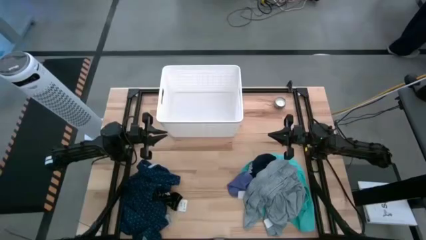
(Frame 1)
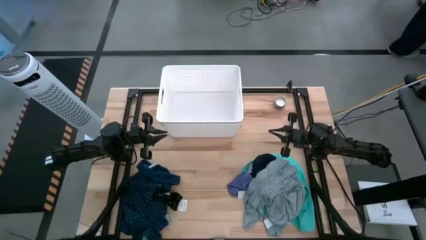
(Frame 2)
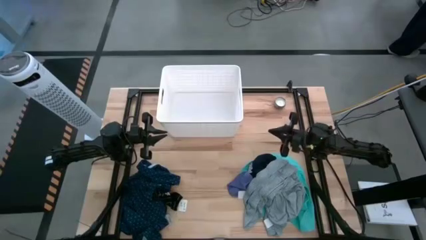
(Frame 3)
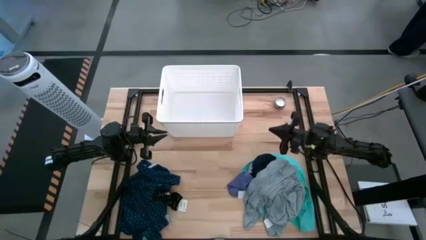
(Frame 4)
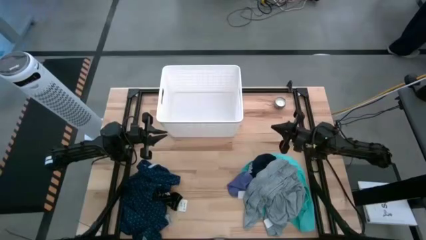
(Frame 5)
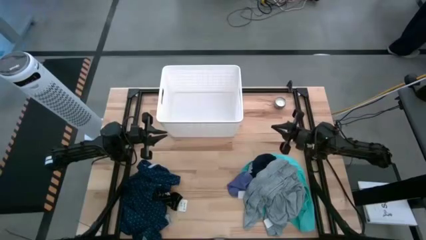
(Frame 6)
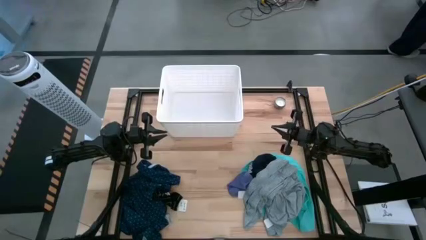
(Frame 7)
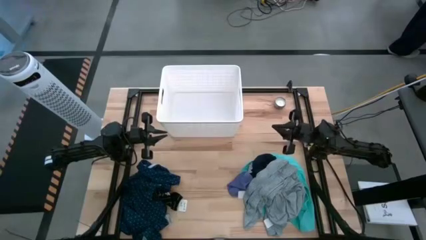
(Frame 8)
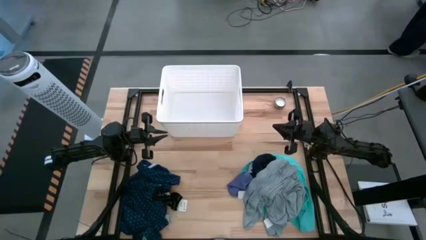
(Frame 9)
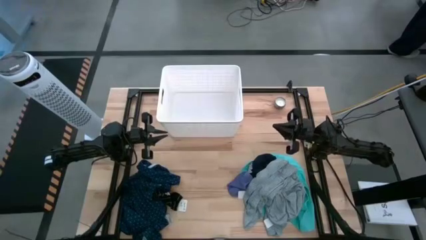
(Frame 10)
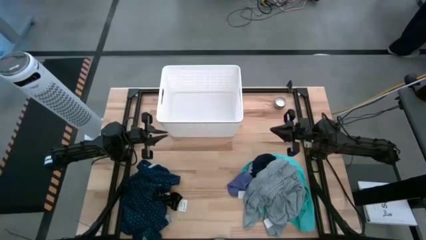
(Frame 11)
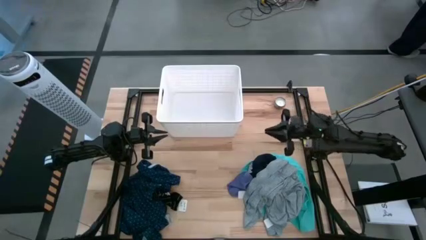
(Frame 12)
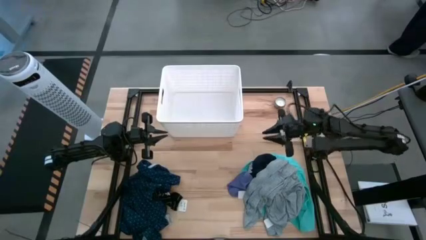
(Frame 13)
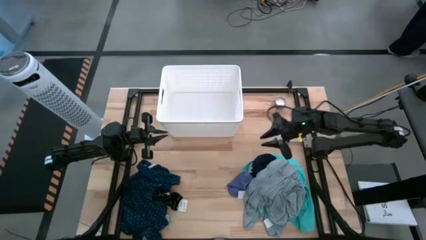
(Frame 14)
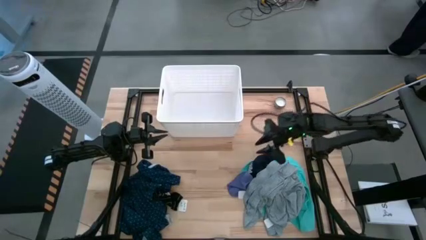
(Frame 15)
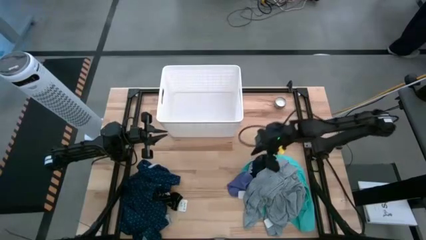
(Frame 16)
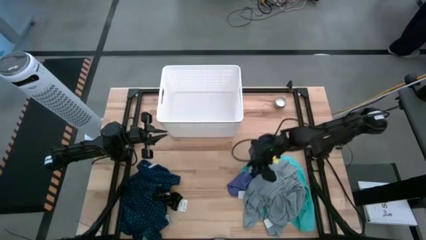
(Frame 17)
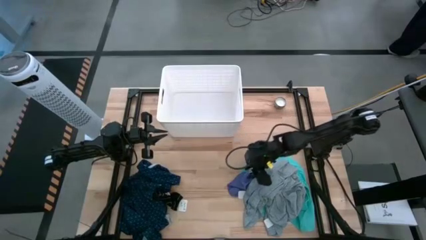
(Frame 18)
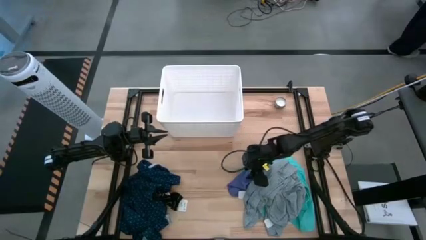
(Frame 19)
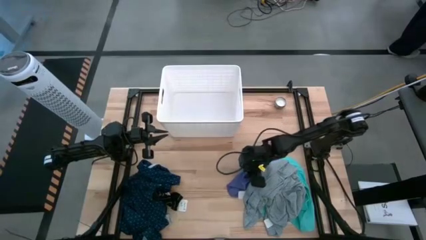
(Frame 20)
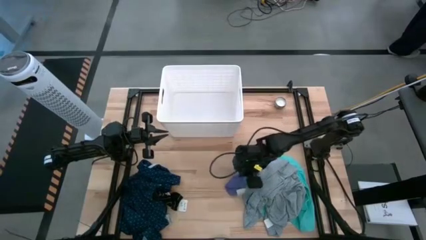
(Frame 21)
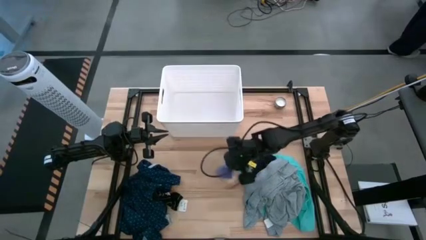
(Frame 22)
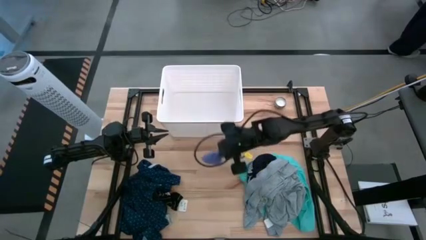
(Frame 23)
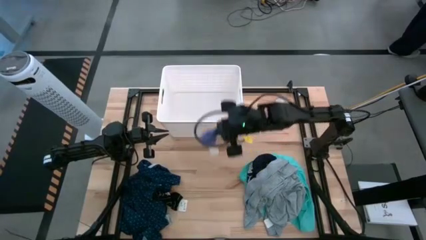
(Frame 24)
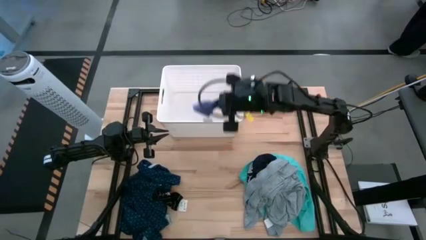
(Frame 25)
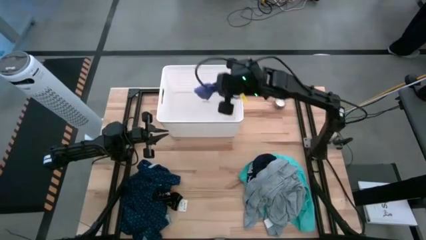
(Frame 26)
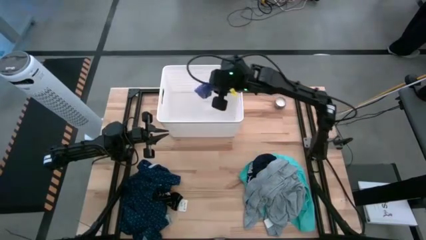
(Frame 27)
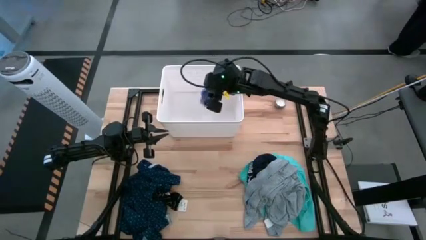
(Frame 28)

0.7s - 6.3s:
Task: Sort clothes
Put the blue sock into the white laundry bin

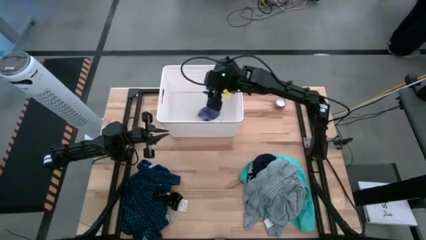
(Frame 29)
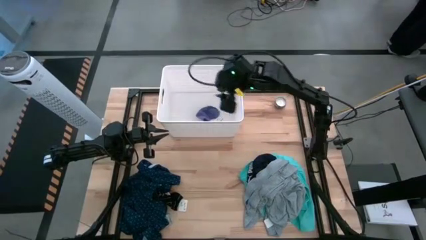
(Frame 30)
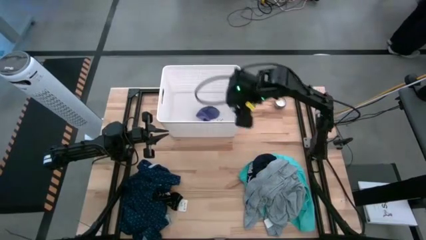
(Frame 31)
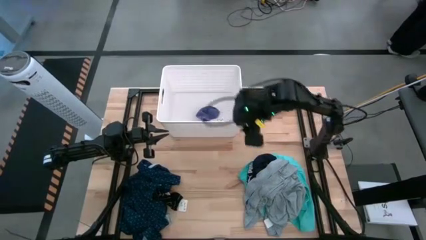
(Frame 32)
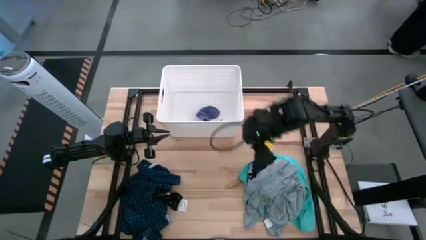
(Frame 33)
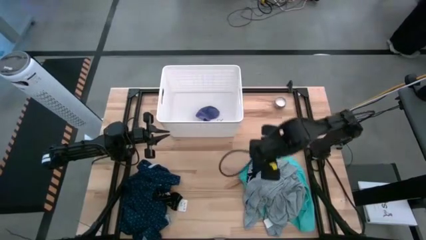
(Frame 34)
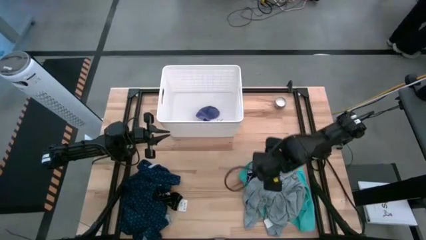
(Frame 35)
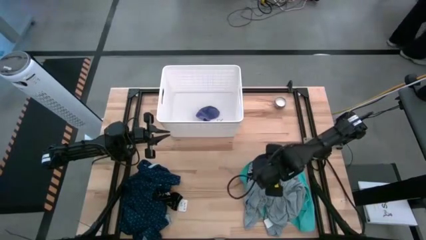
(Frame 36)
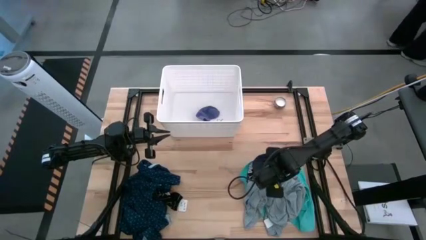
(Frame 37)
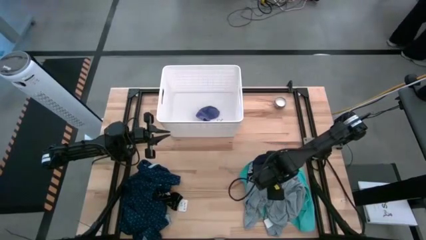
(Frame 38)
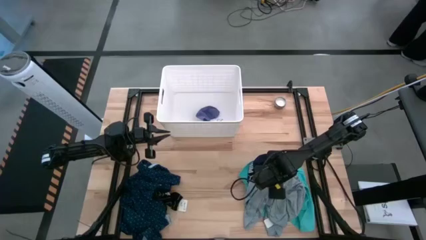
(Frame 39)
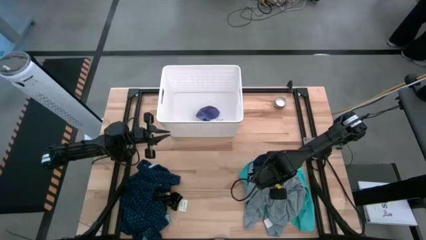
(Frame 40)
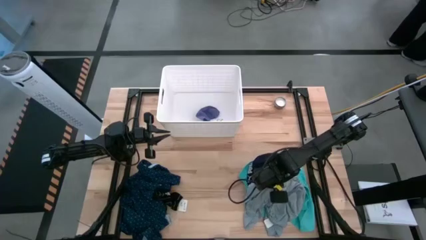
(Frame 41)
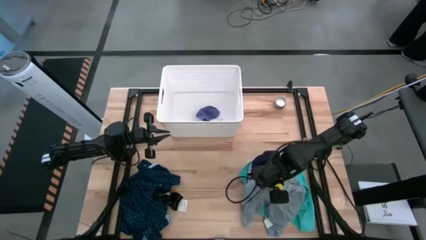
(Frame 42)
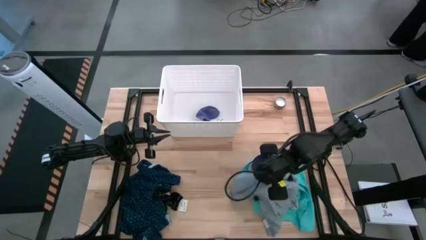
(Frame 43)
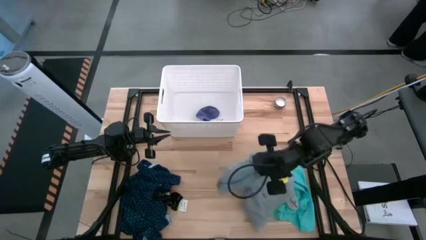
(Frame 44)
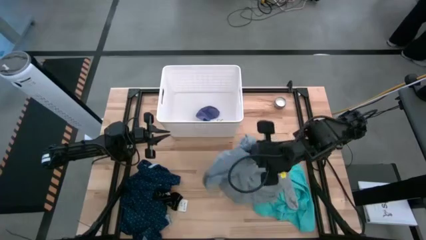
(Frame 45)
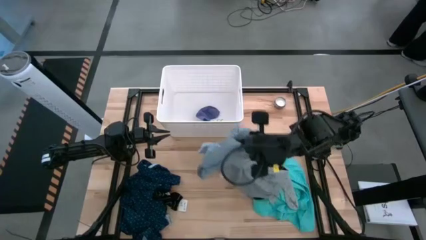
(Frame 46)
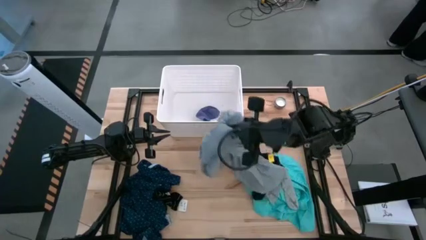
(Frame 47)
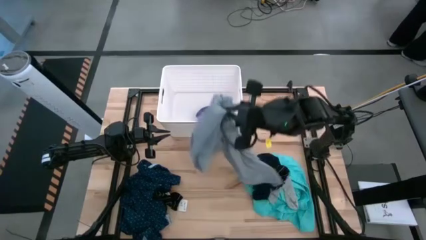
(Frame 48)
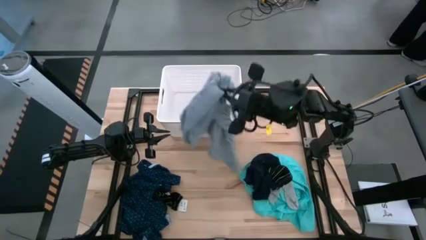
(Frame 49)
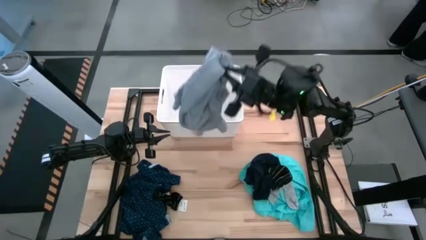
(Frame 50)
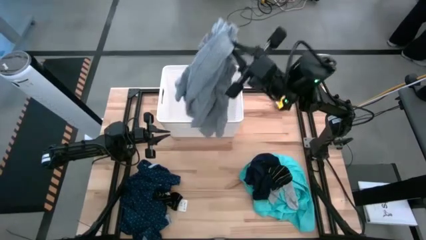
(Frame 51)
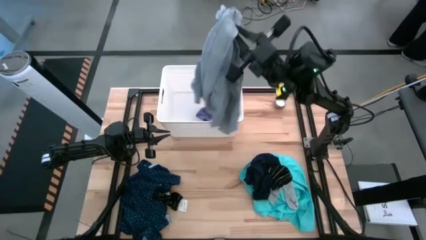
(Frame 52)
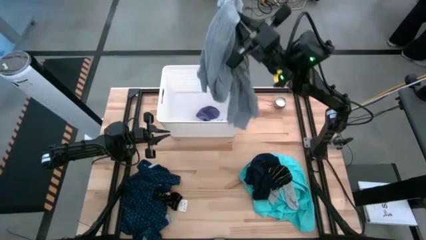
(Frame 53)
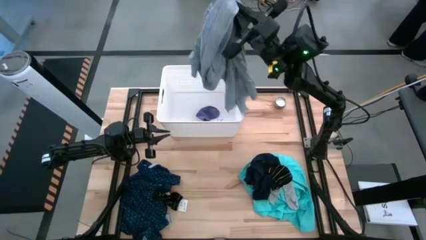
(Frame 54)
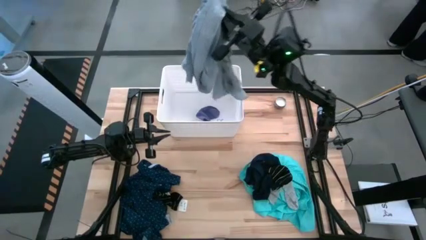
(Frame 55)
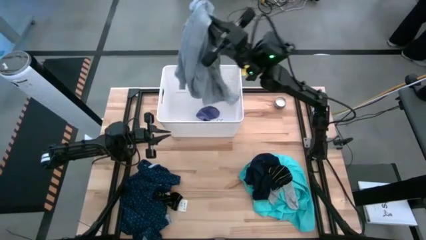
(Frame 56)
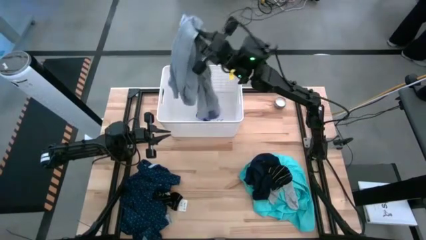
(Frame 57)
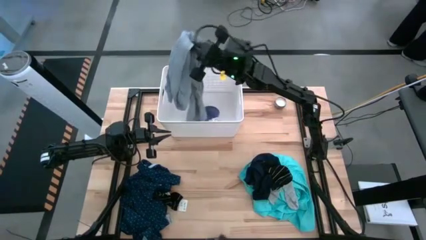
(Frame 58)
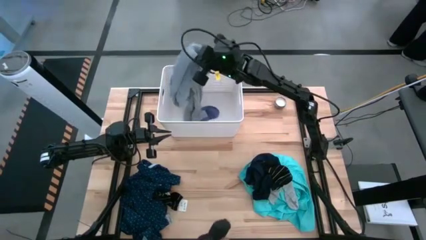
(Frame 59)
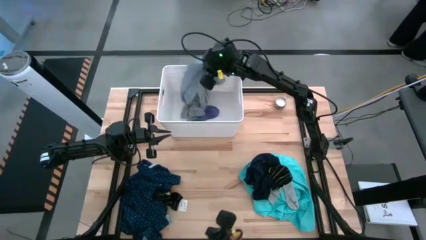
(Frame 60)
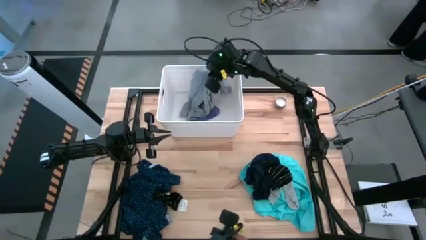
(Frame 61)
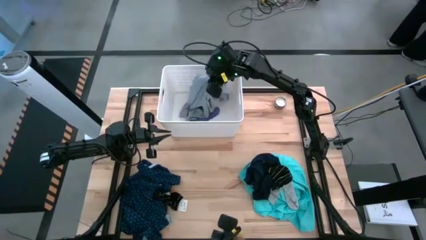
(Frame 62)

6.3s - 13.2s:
Put the gray shirt into the white laundry bin

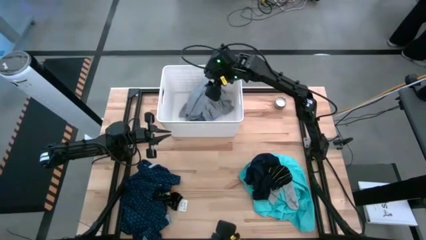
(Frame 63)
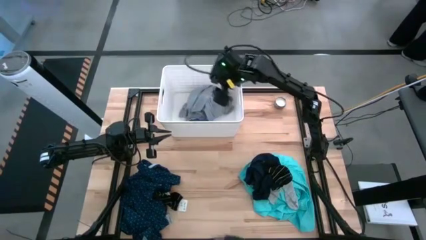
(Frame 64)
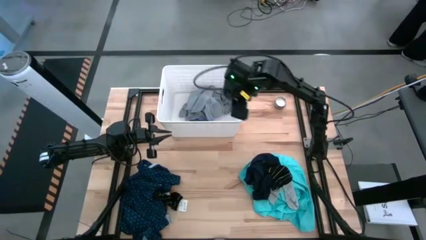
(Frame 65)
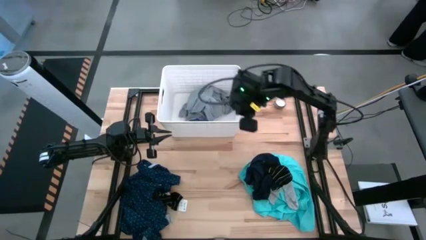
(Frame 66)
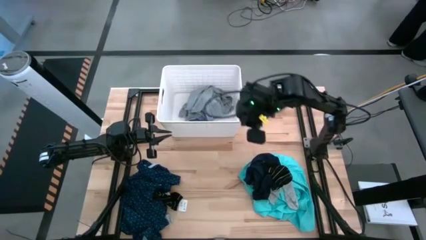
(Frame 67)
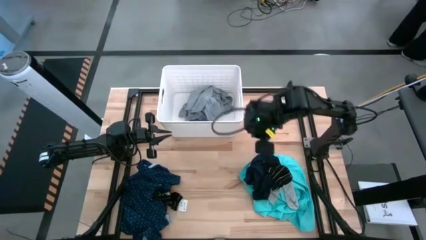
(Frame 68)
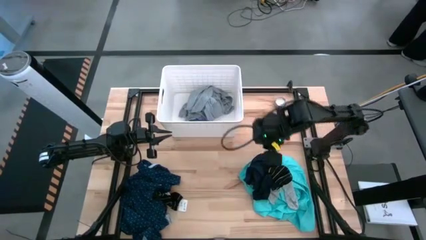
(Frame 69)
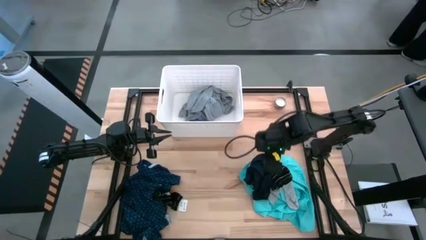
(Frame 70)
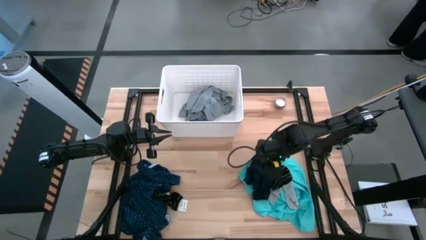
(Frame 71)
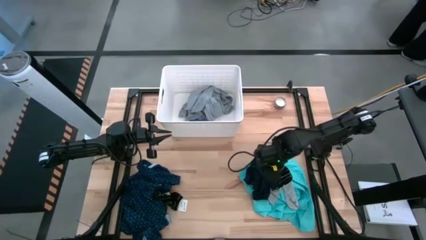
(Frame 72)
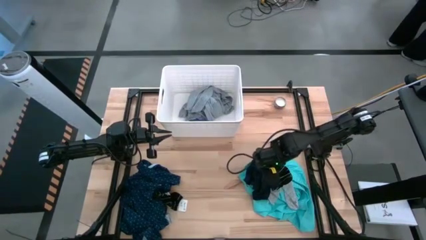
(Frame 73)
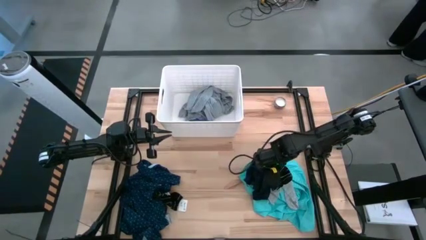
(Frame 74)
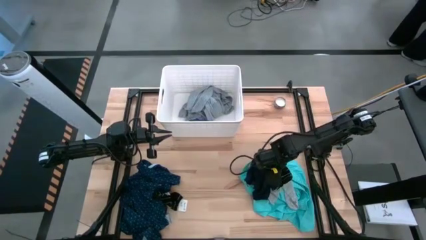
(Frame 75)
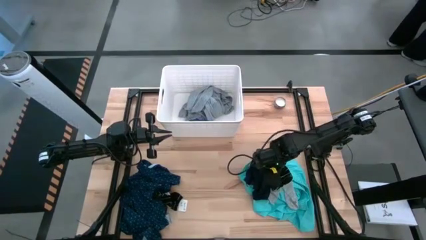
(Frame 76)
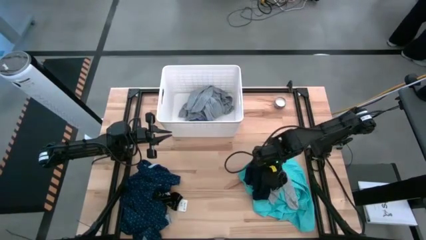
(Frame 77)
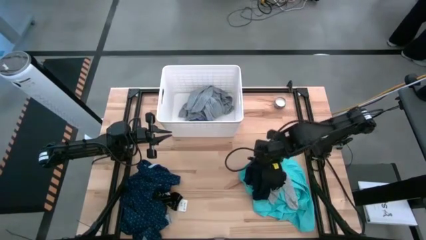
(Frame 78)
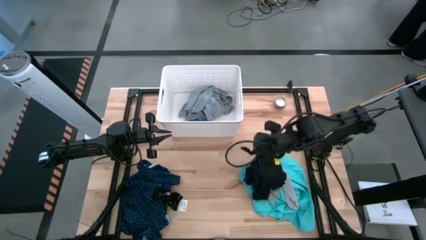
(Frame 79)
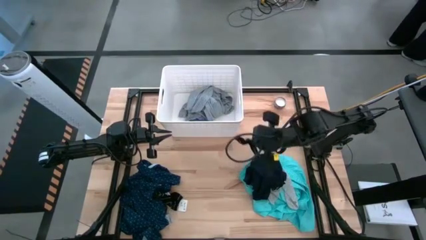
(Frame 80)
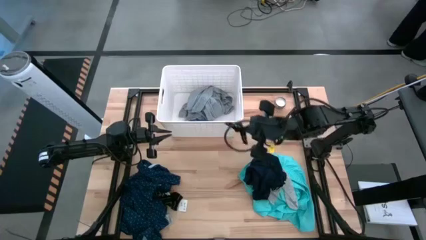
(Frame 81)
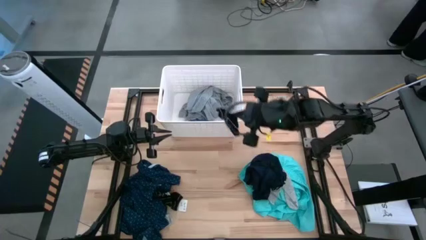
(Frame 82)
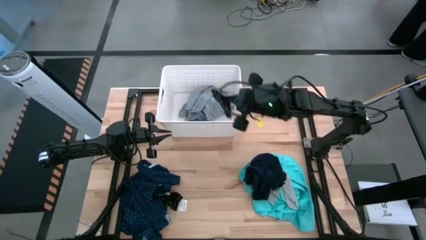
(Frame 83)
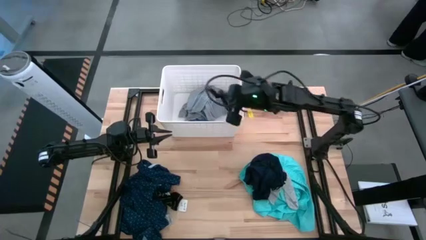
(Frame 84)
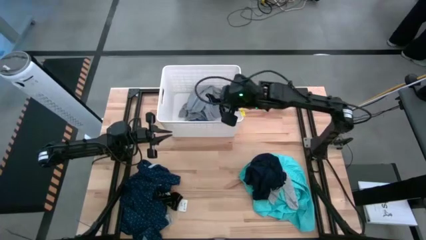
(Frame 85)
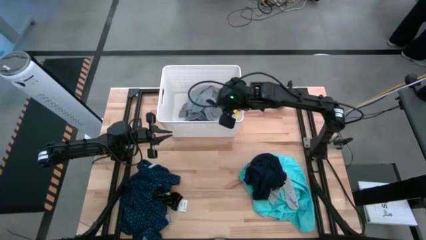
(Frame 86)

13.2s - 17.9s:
Put the black sock into the white laundry bin
